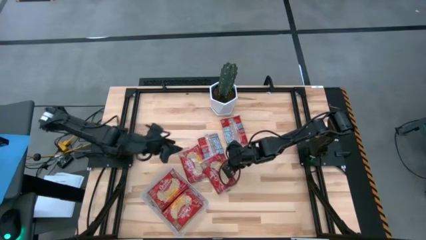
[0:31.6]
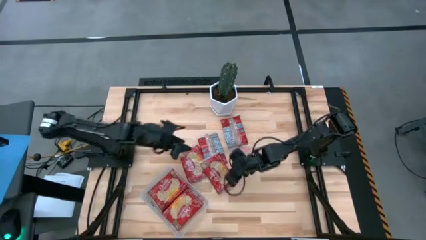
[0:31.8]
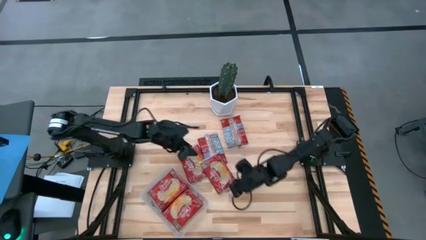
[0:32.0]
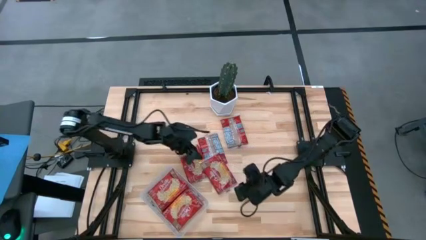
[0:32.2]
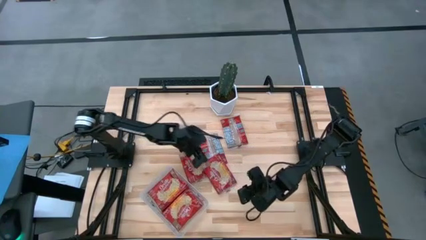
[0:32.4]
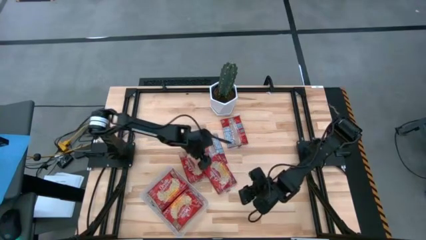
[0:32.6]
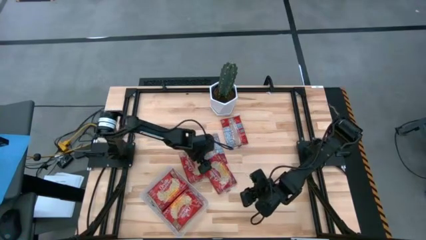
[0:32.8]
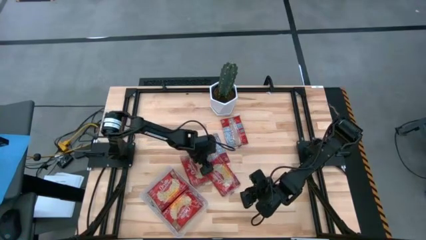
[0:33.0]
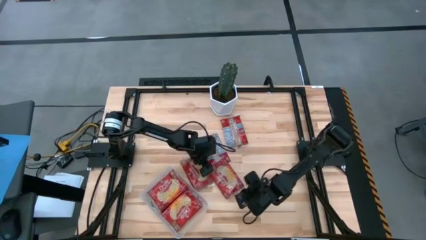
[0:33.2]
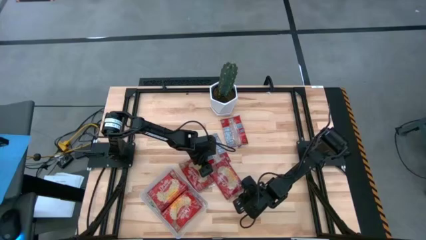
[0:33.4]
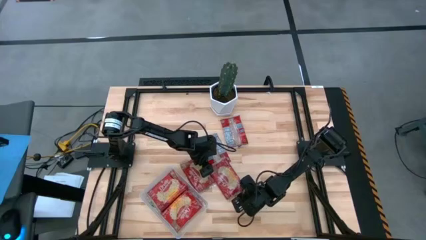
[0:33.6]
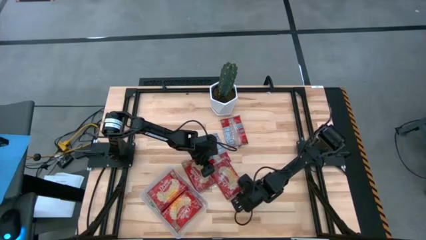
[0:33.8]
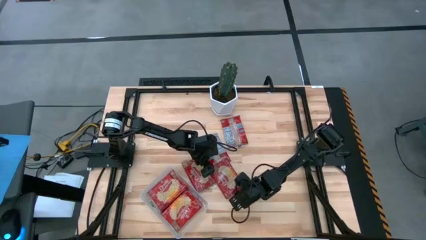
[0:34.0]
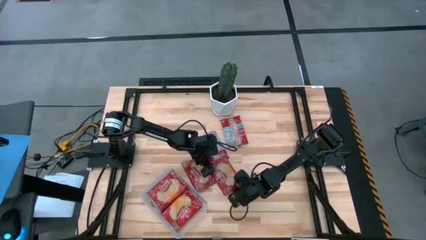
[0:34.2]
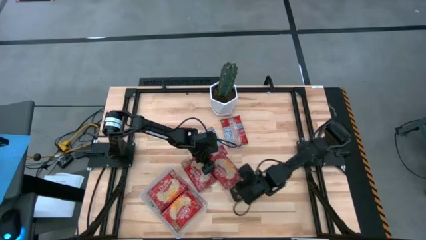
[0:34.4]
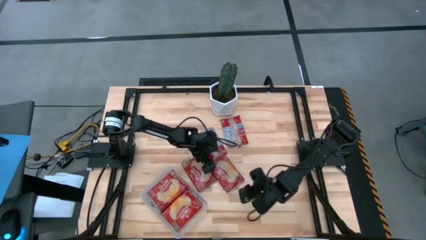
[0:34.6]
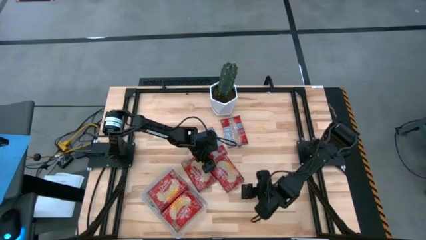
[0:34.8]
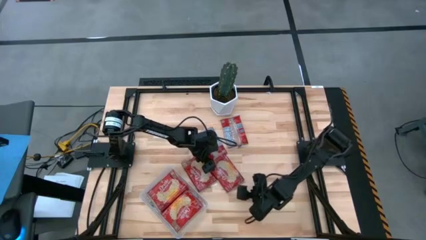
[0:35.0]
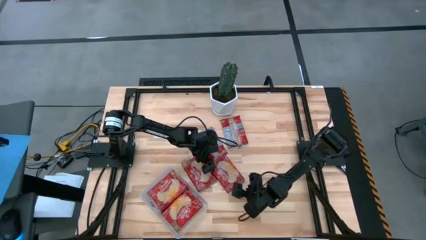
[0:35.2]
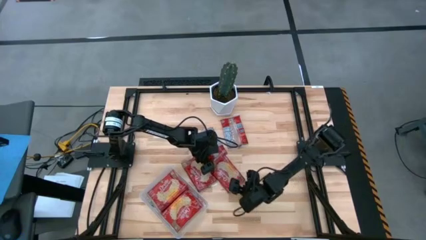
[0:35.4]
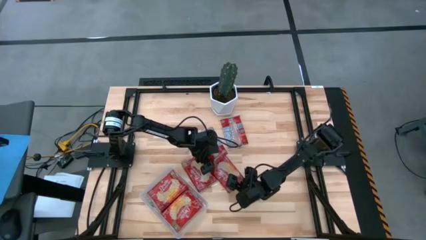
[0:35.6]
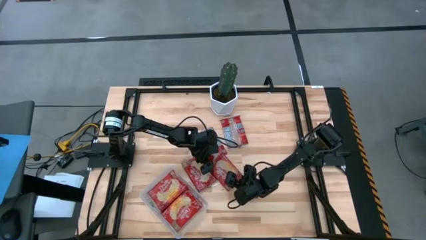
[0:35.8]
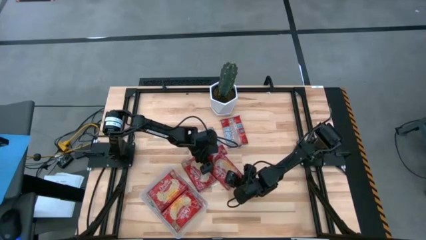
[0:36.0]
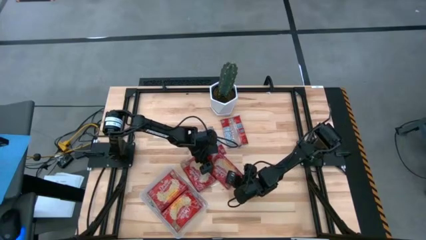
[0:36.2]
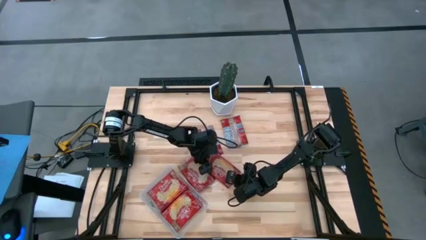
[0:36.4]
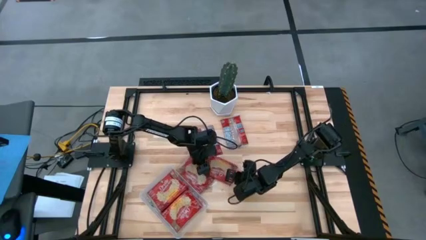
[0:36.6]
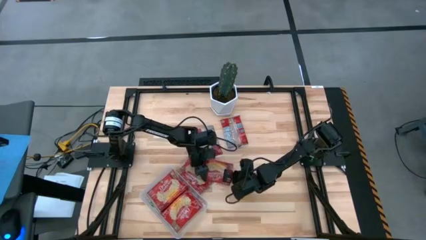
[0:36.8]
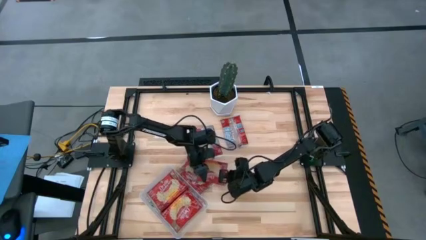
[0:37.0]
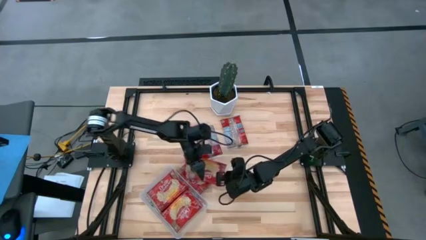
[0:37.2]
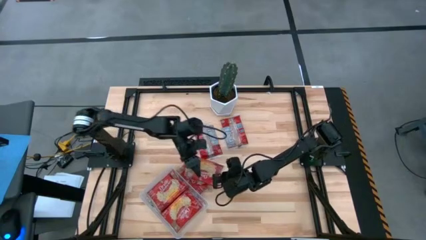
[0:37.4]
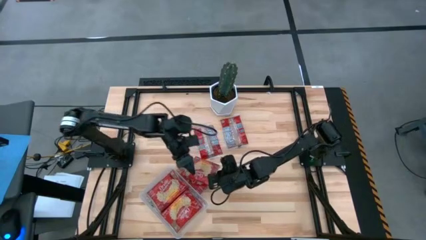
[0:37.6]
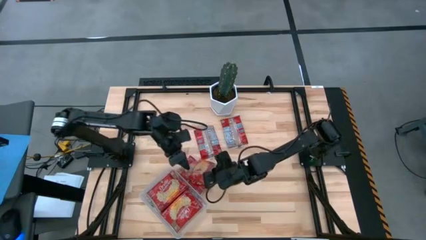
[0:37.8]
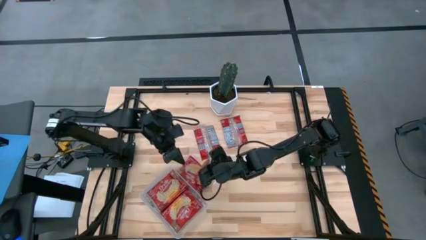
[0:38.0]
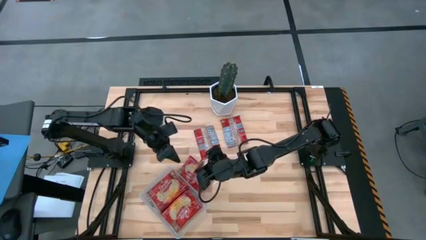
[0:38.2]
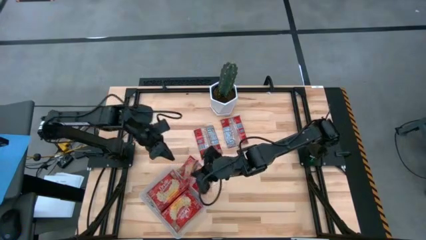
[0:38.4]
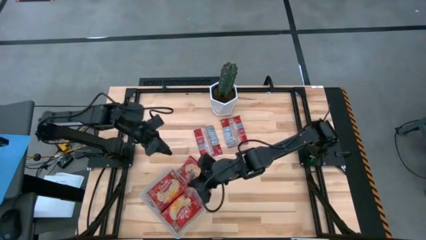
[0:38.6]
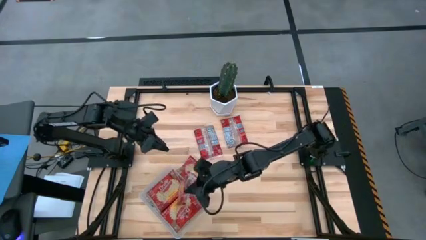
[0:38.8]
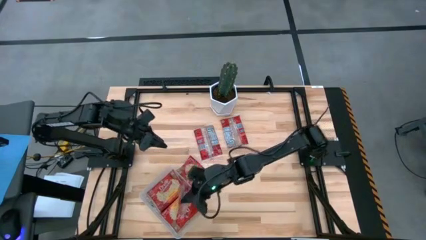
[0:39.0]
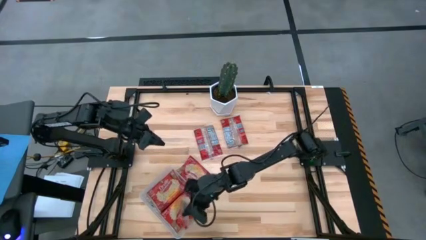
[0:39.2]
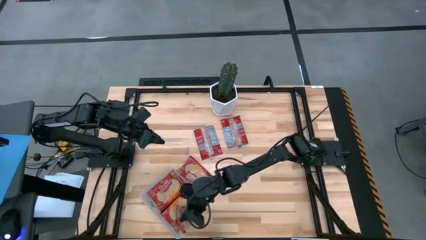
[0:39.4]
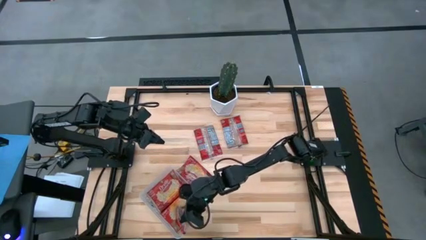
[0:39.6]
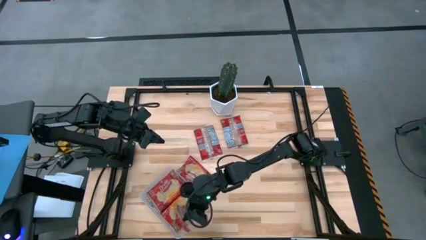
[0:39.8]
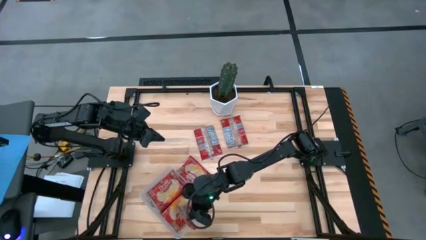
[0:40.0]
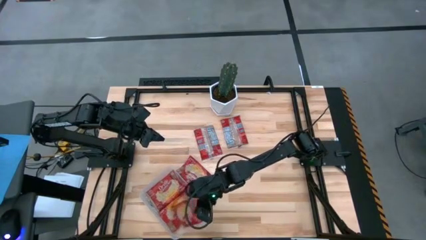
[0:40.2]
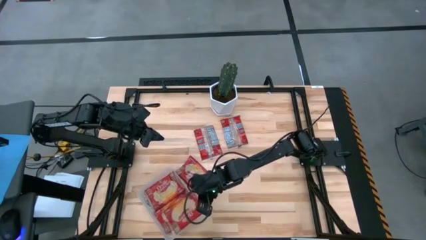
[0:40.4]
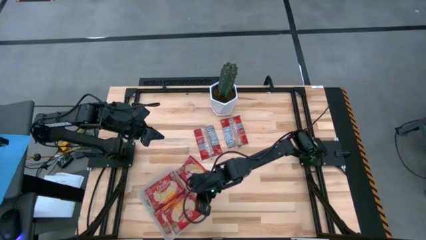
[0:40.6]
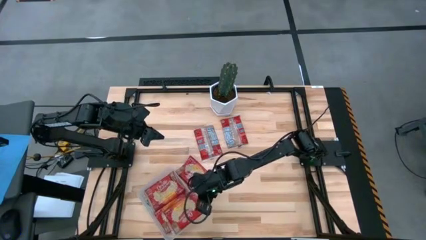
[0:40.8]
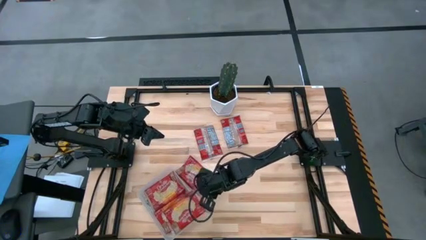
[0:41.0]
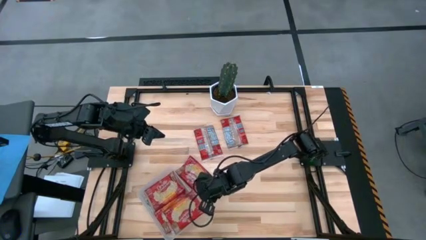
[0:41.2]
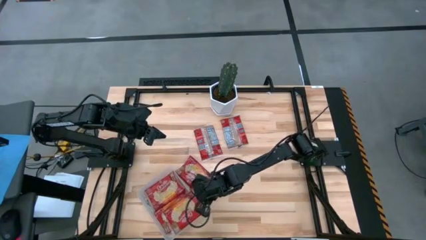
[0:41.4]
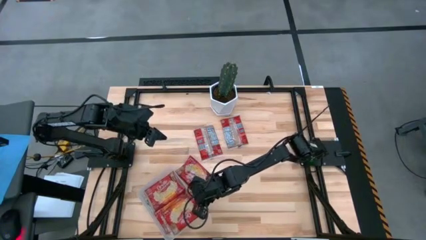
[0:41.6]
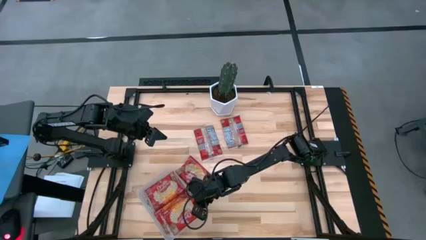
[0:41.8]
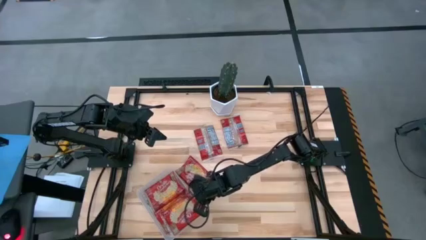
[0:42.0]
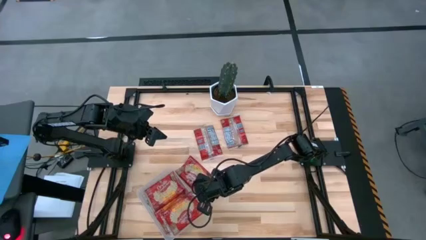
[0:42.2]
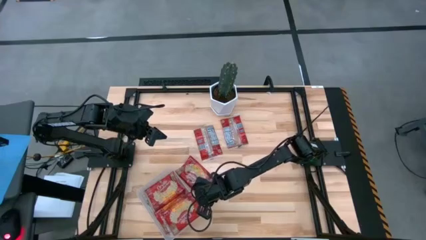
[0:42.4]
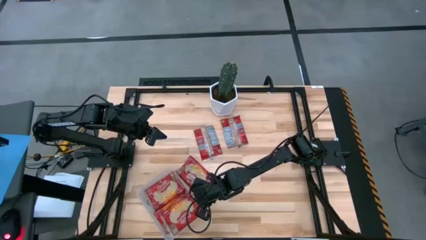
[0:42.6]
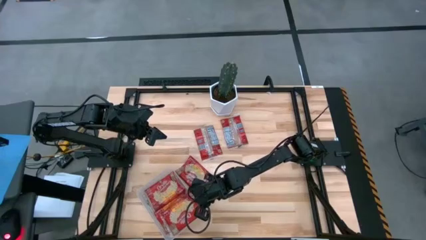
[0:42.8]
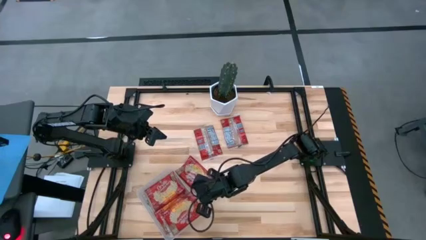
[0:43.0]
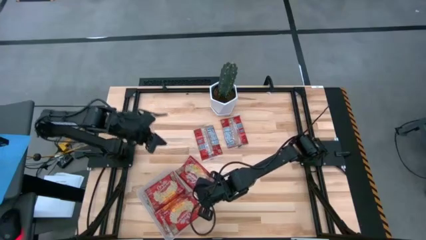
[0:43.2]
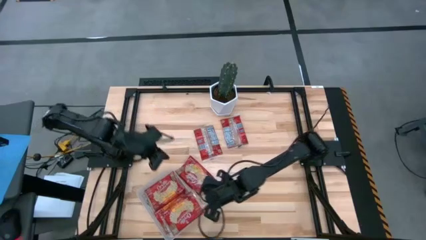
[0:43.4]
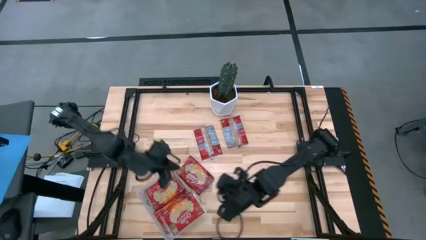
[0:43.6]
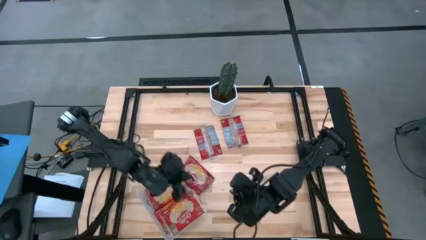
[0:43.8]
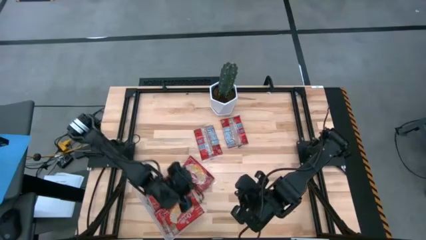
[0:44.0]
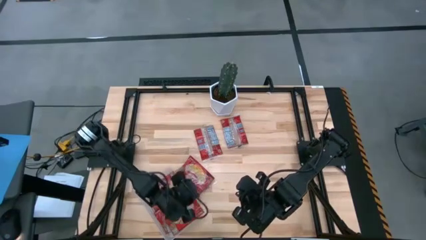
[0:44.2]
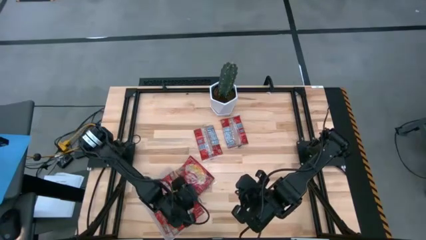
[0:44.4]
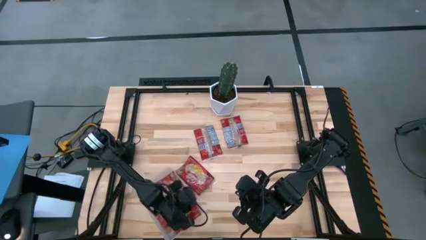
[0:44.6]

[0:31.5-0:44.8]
Task: Sort popcorn bags into baskets
Put the red popcorn bag into the transparent bin

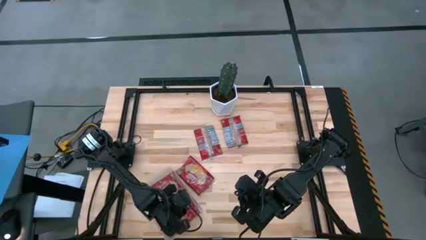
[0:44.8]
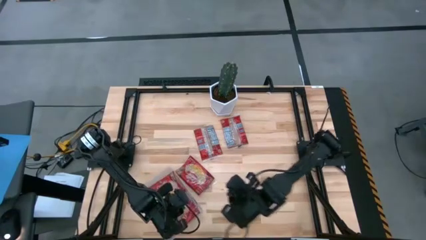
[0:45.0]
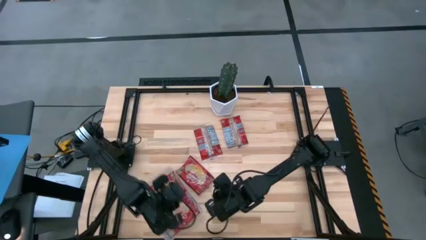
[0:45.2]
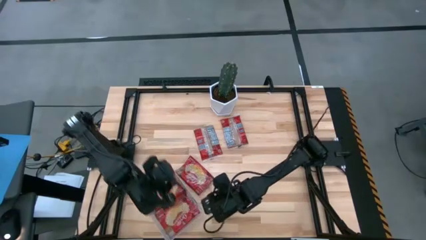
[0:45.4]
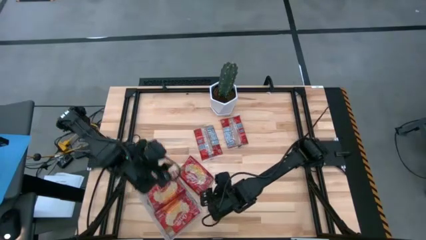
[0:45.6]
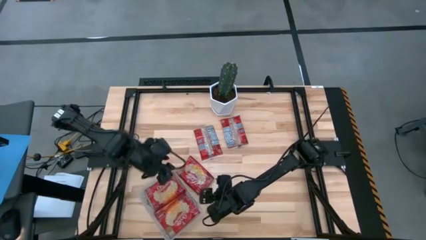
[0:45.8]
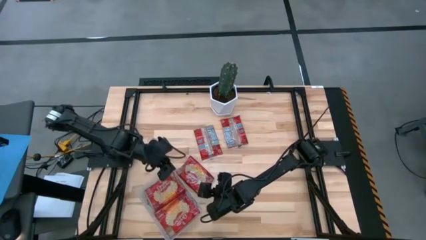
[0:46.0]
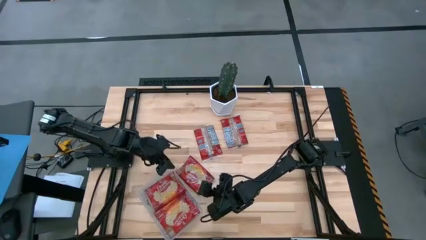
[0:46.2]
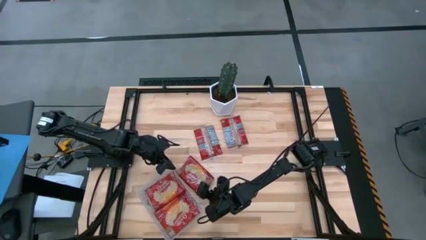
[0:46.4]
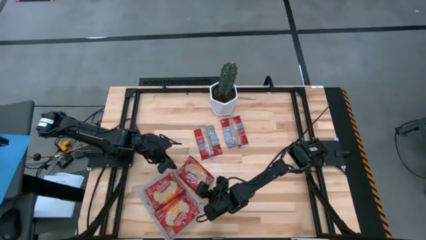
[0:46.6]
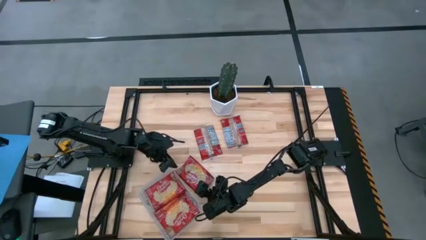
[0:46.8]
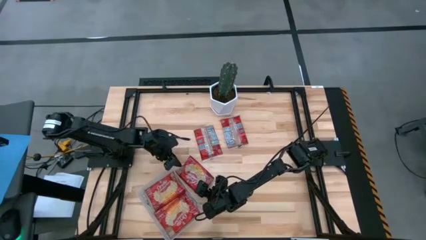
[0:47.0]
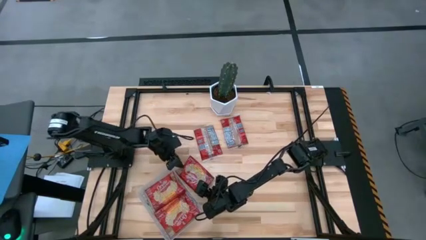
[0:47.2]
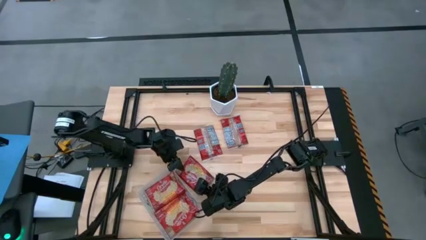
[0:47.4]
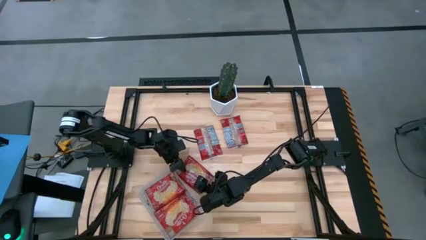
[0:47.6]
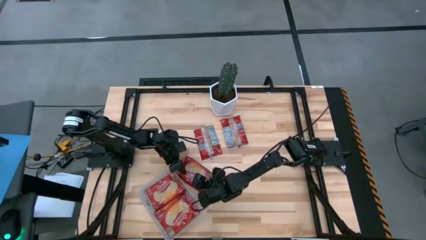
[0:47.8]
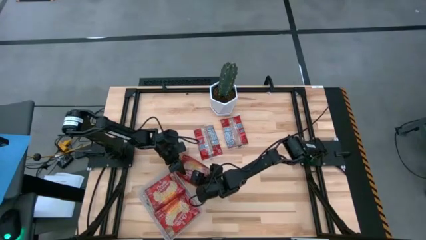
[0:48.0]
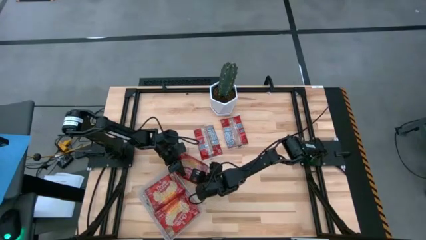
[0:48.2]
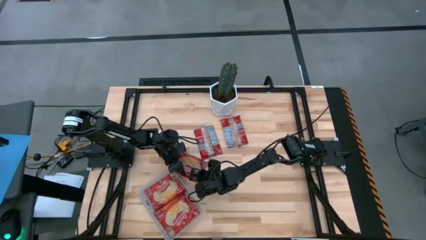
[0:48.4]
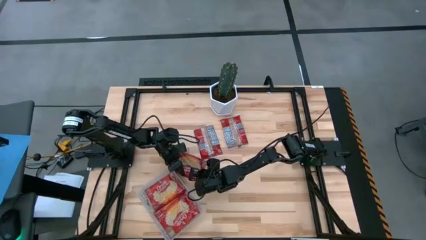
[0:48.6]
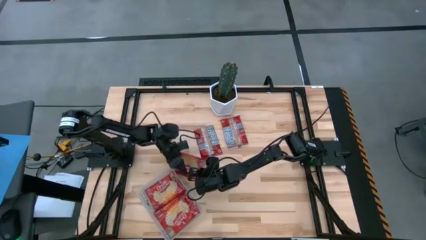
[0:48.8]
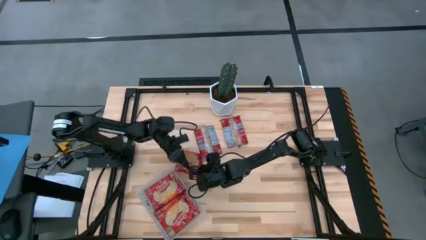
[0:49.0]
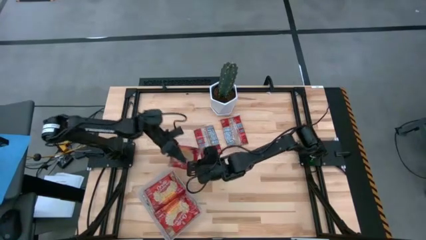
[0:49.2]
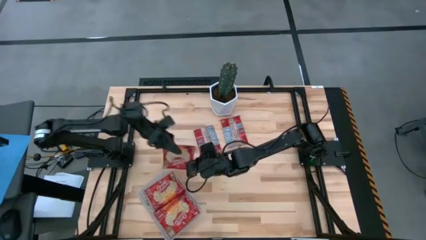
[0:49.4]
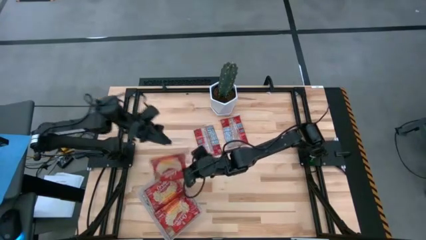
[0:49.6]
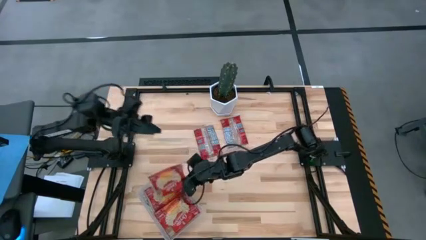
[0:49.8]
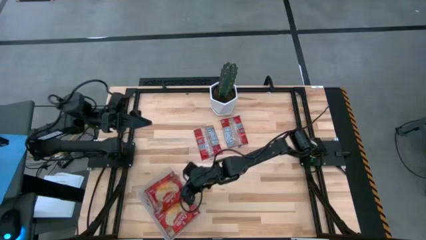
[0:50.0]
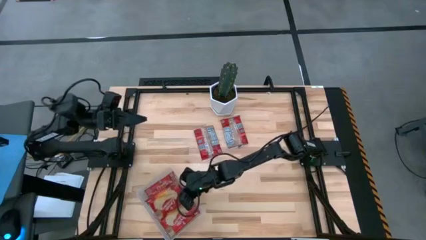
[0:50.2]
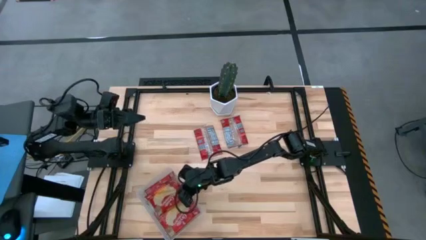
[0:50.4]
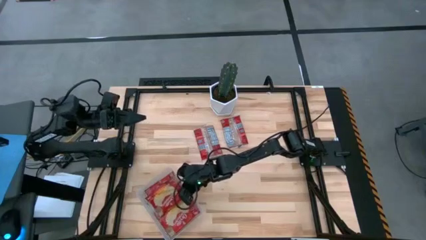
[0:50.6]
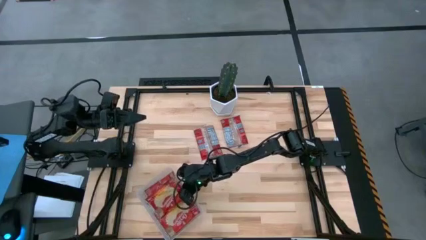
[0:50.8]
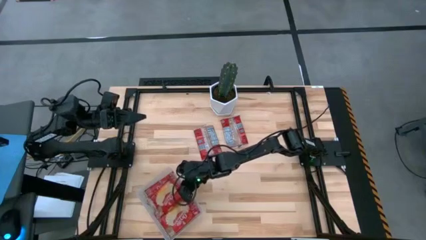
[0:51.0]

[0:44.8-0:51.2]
Put the bottom red popcorn bag into the transparent bin
